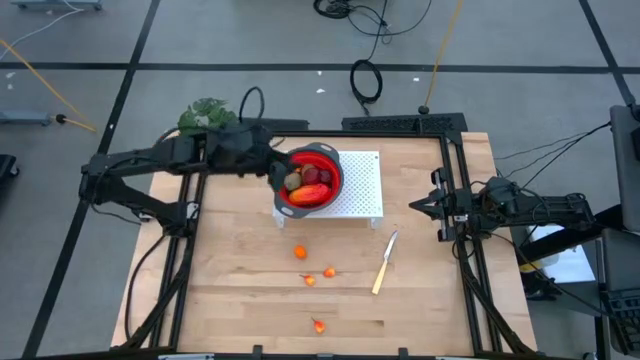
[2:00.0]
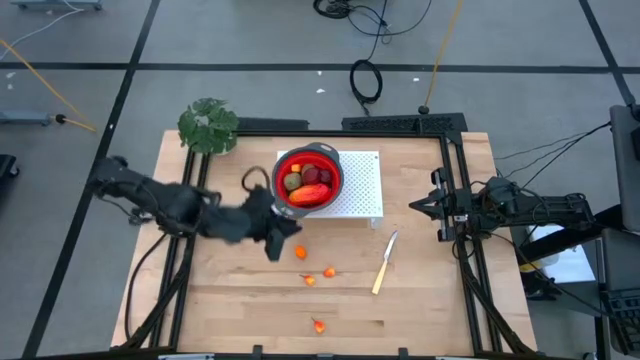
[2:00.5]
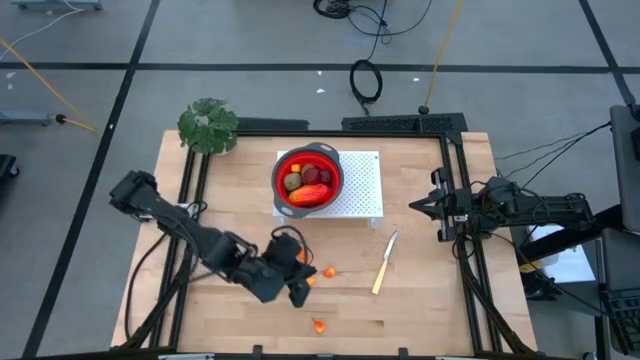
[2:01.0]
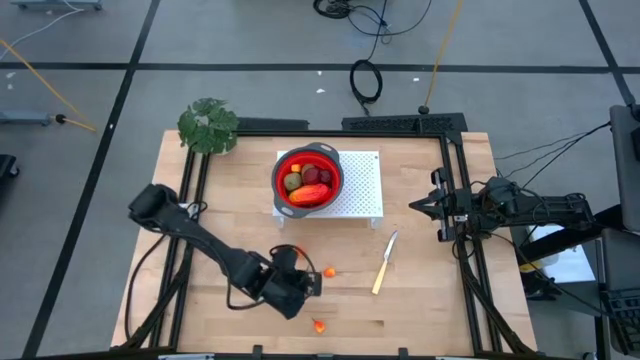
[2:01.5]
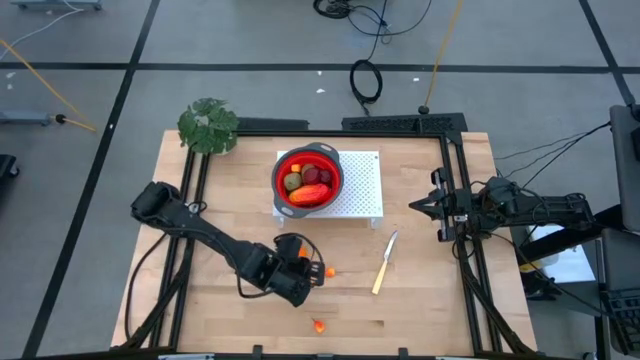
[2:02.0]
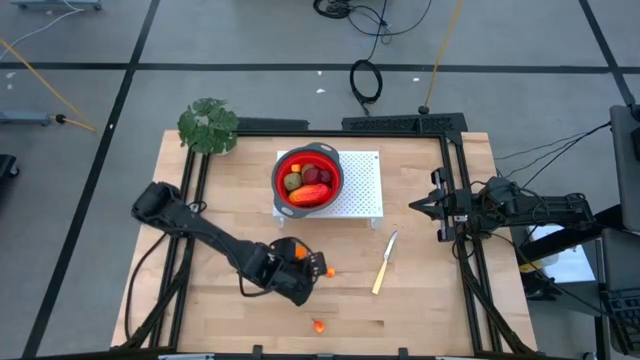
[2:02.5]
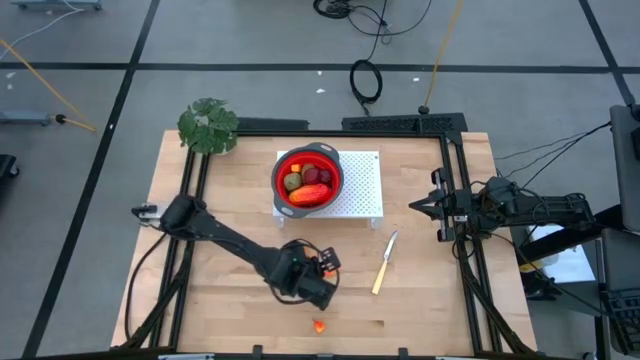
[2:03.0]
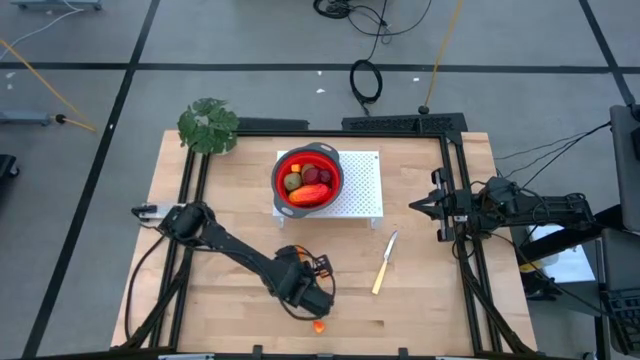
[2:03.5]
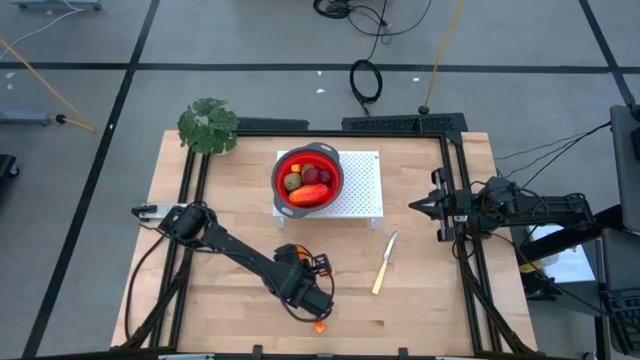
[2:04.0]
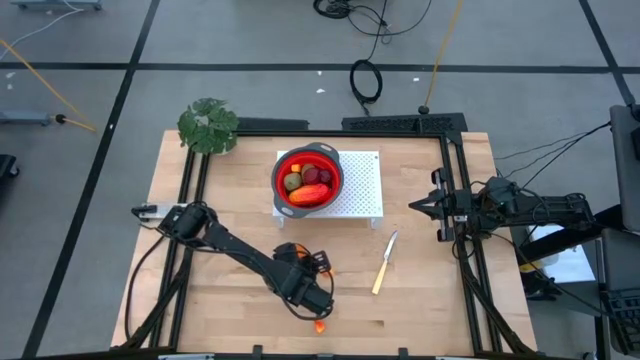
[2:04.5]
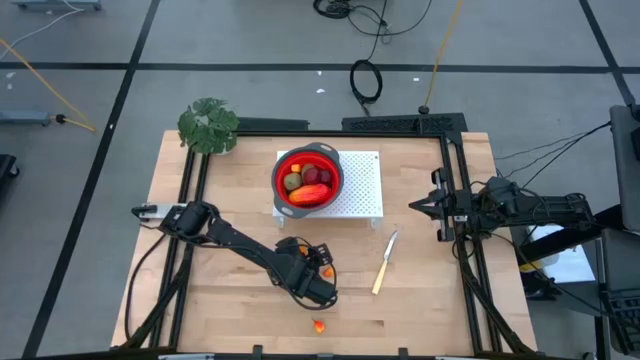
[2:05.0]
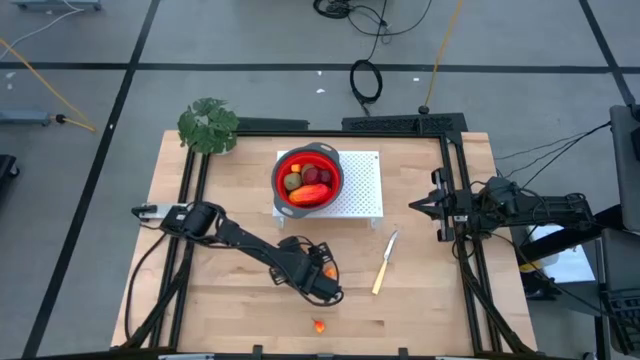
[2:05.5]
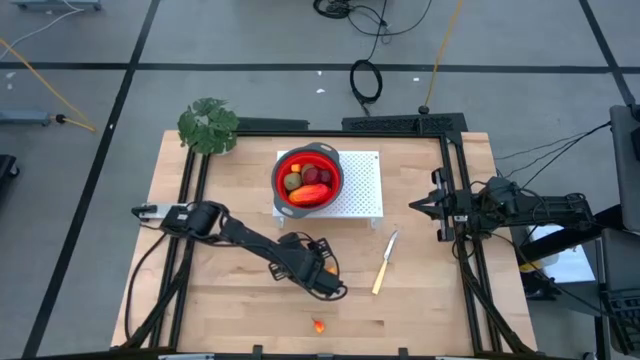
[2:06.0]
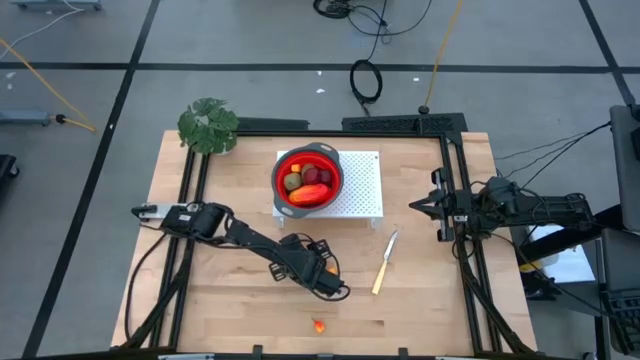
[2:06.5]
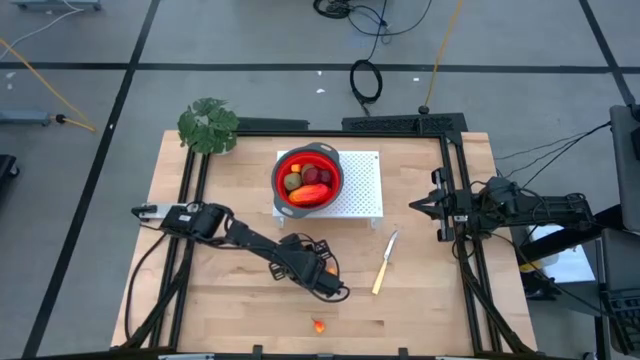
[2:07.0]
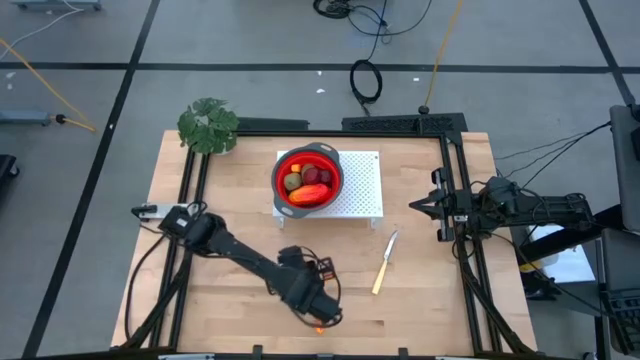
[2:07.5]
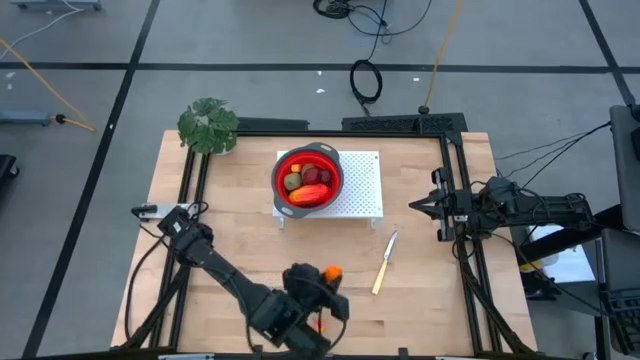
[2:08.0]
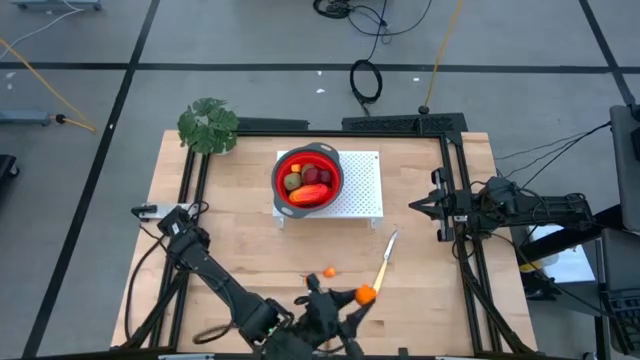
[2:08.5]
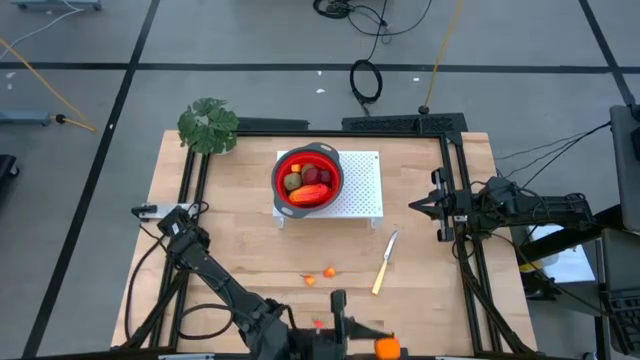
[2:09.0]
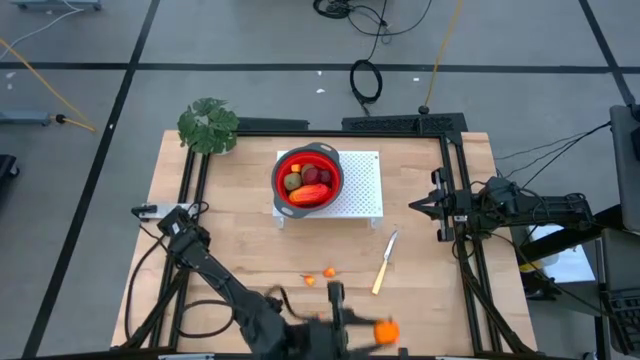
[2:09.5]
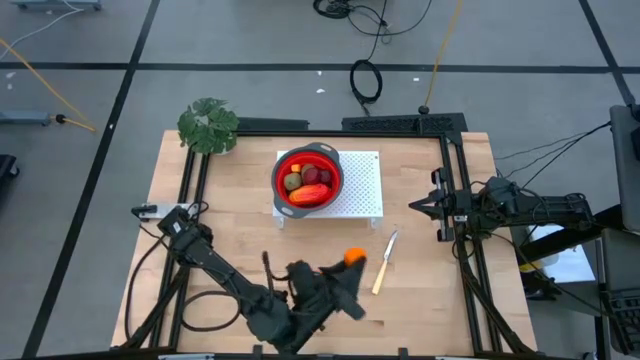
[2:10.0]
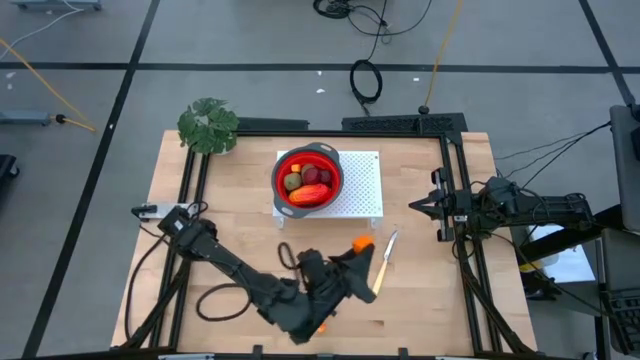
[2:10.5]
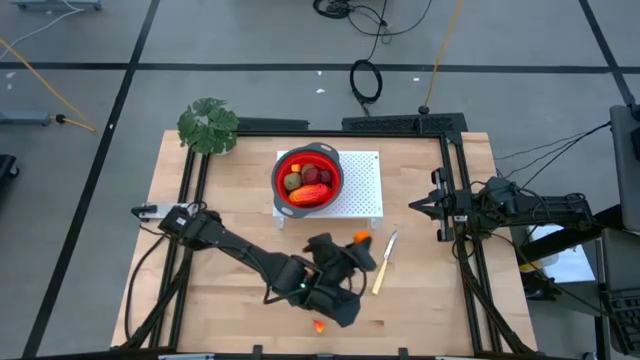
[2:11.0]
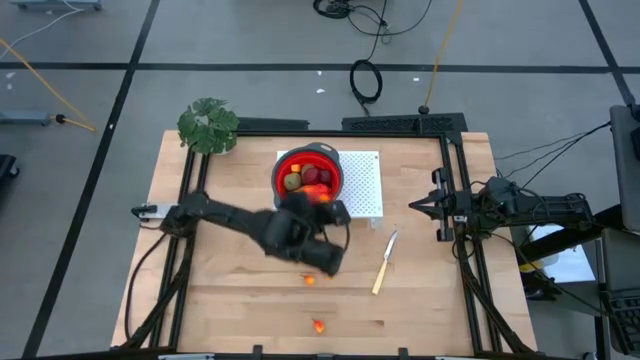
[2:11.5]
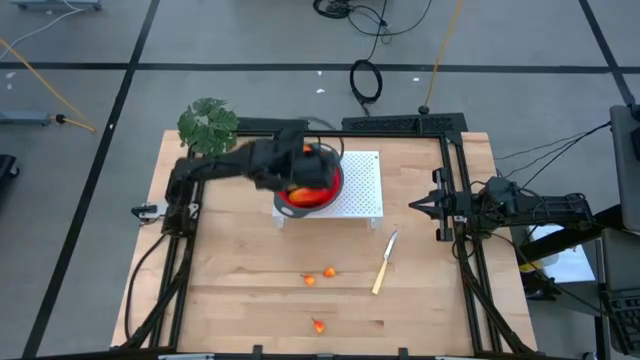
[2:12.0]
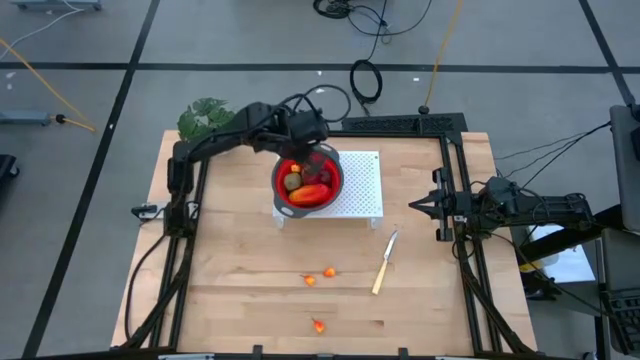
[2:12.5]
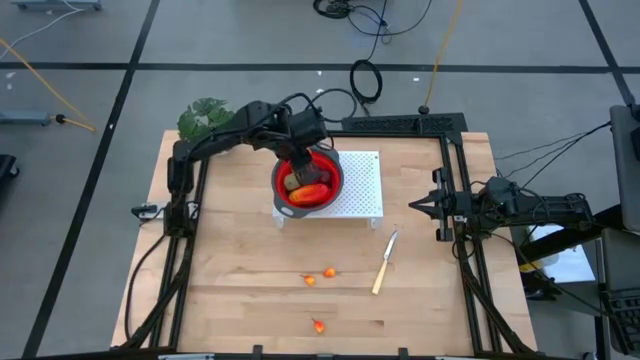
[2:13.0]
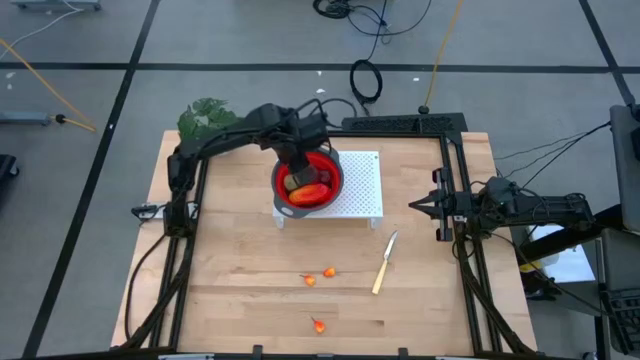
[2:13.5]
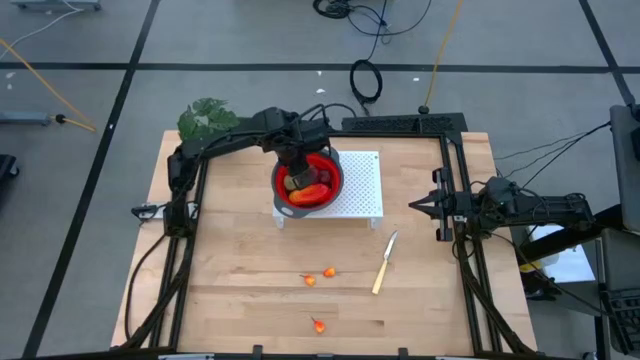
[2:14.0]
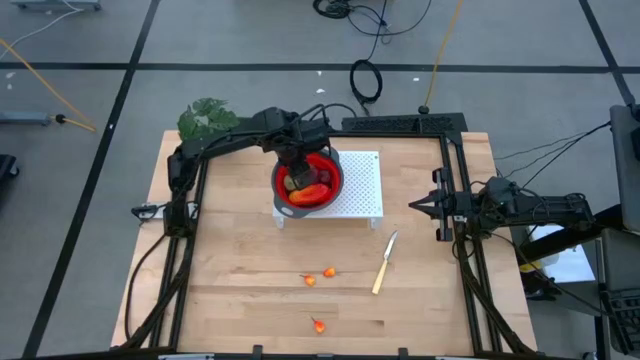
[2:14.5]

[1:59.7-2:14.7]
Task: Pick & Place Fruit
Put the orange into the orange strainer bowl on the shelf

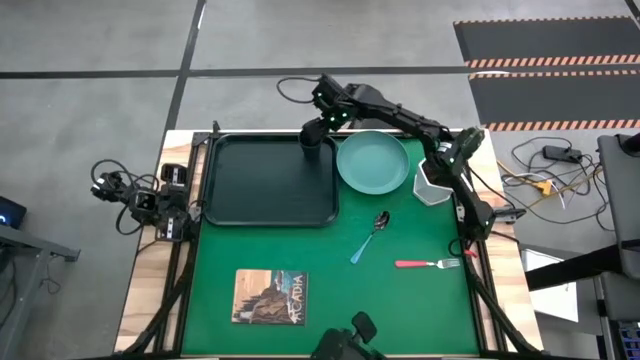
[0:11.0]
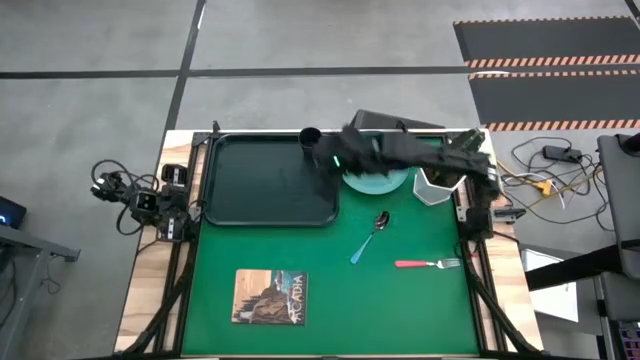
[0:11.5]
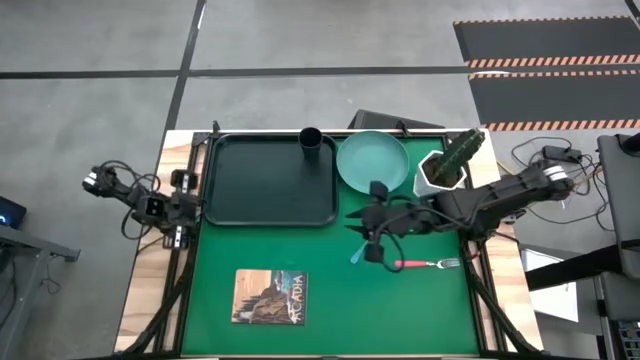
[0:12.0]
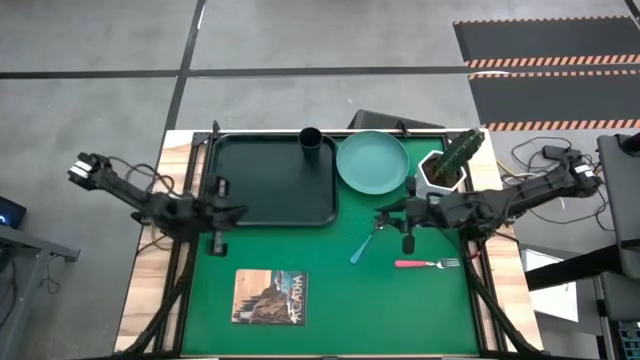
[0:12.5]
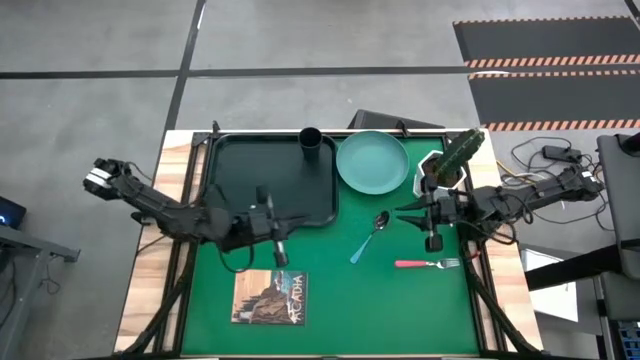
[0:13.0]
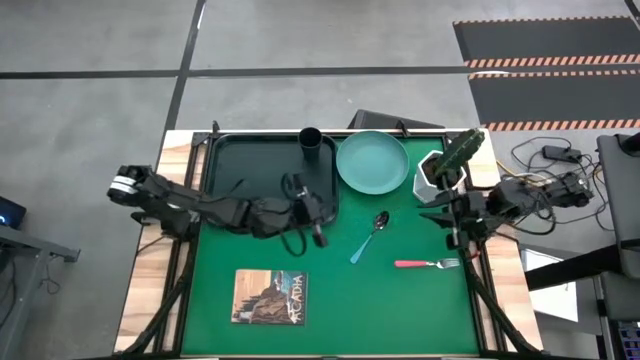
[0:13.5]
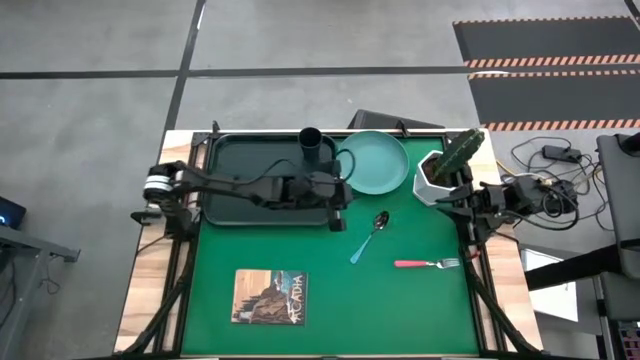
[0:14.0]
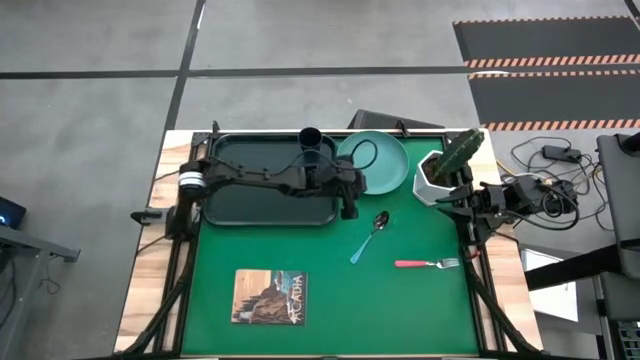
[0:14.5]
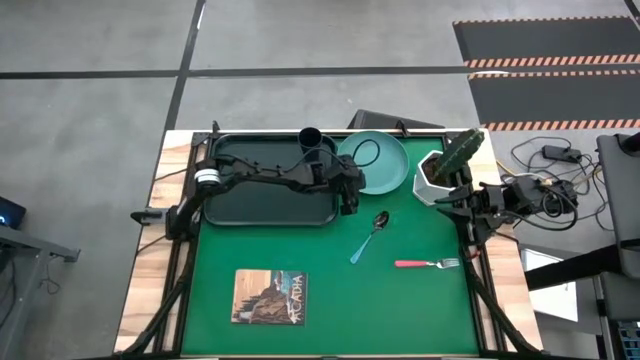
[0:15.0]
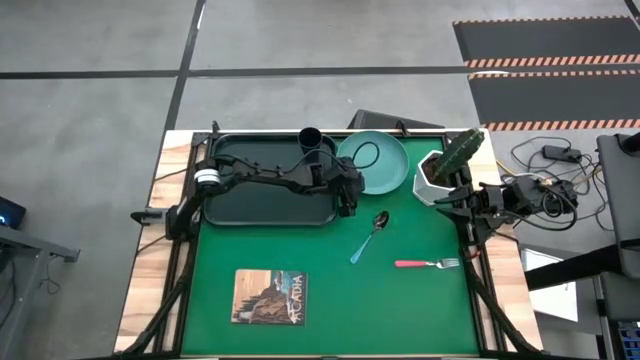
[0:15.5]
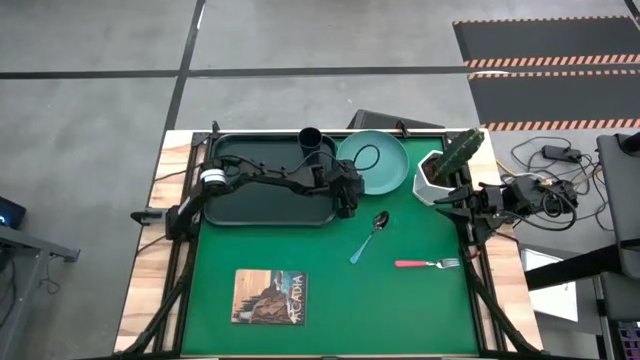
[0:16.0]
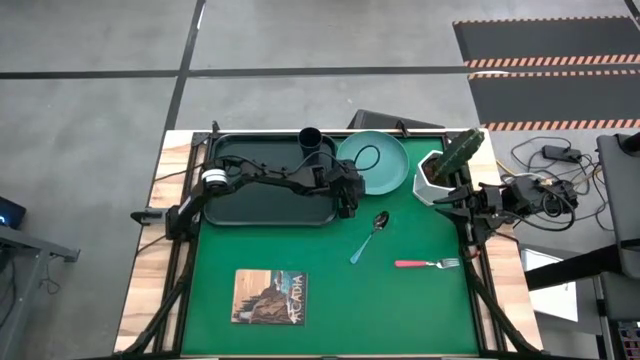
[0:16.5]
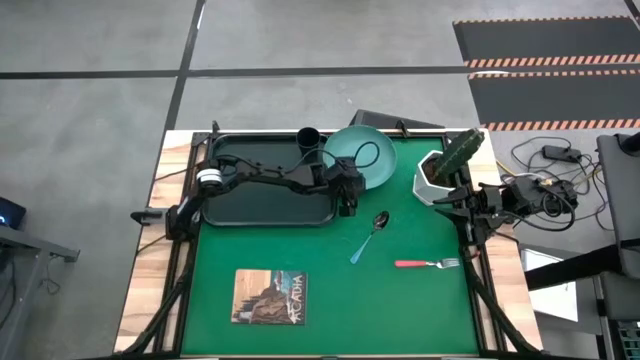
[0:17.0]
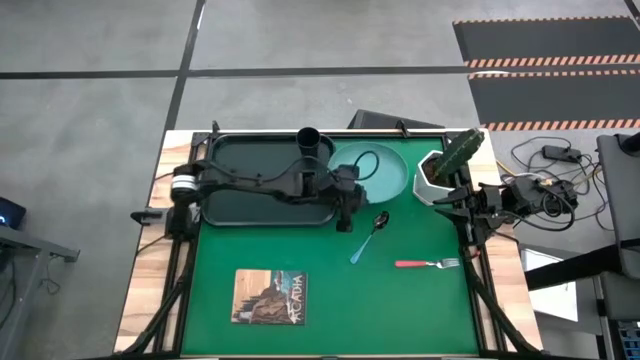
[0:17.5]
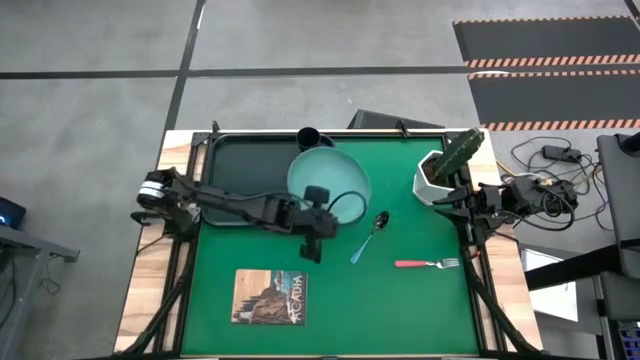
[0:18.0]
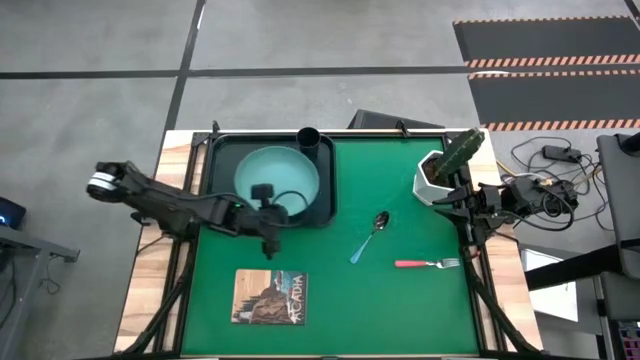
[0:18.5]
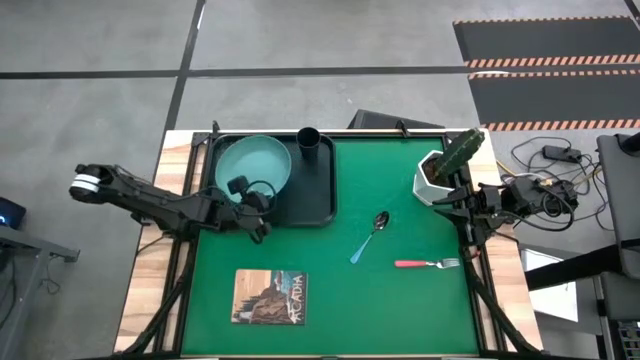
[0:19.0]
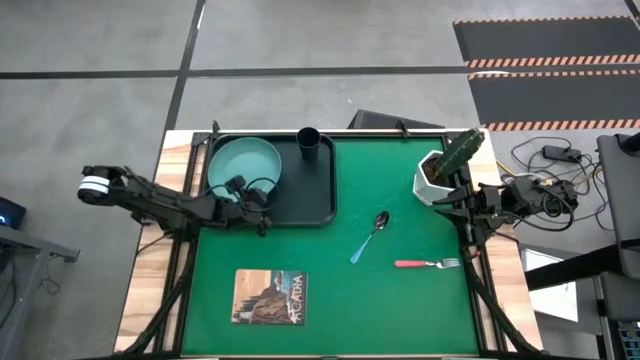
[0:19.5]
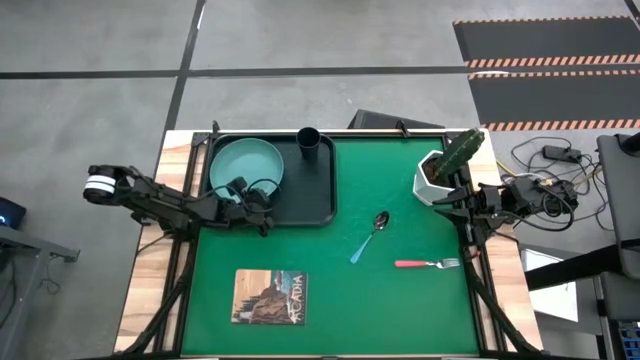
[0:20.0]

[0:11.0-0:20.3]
Task: Pick and place plate/cup/fork/spoon on tray
Put the green plate on the black tray
